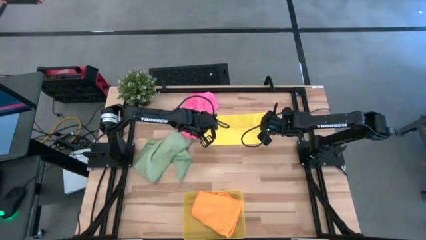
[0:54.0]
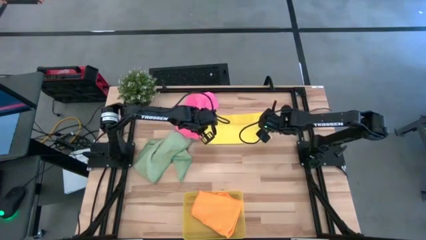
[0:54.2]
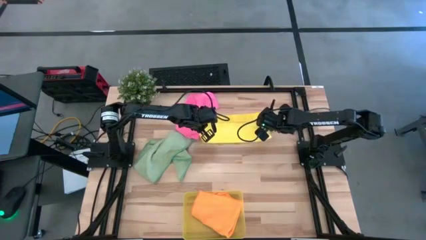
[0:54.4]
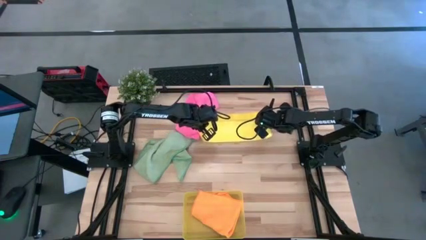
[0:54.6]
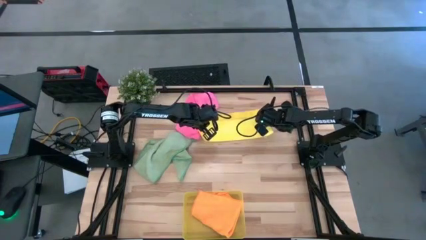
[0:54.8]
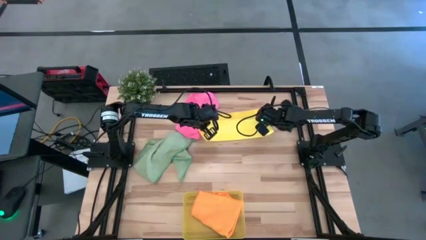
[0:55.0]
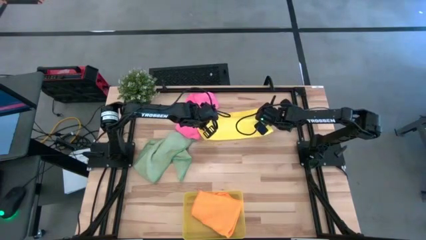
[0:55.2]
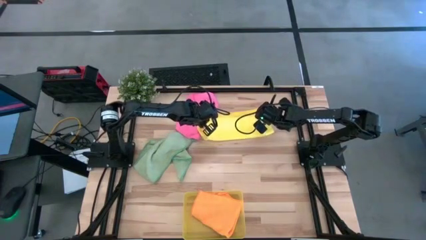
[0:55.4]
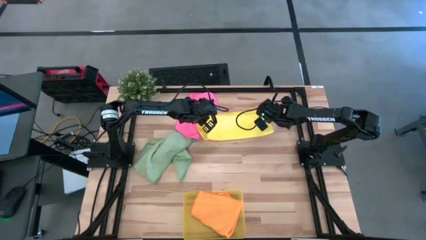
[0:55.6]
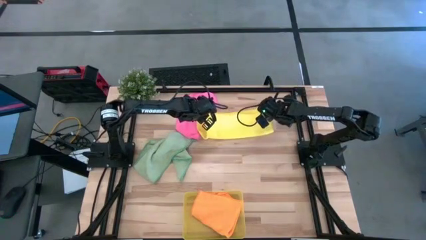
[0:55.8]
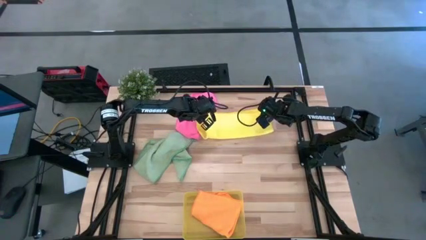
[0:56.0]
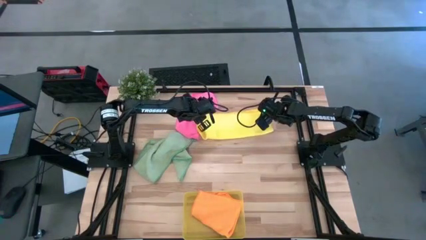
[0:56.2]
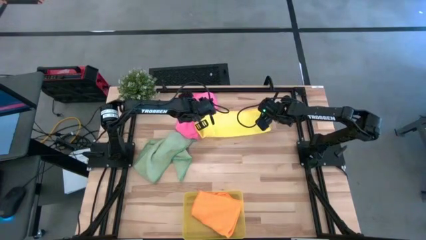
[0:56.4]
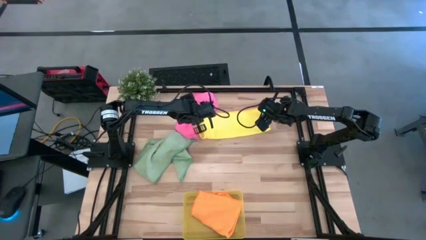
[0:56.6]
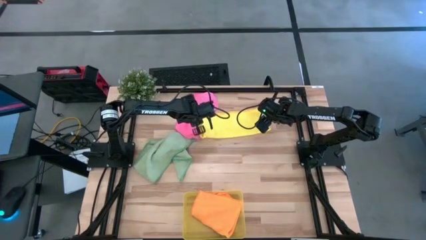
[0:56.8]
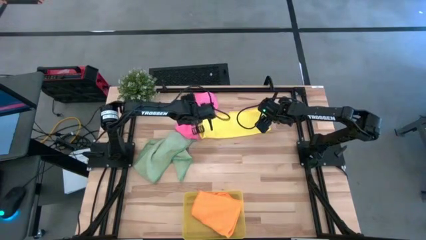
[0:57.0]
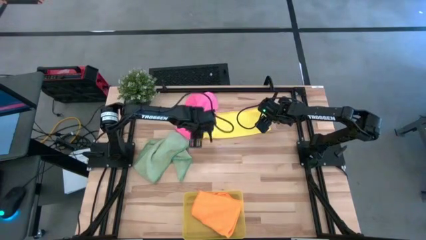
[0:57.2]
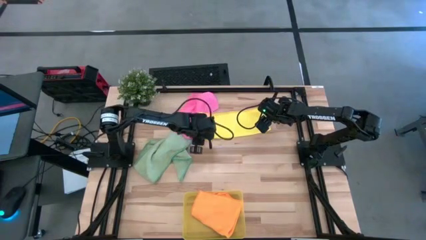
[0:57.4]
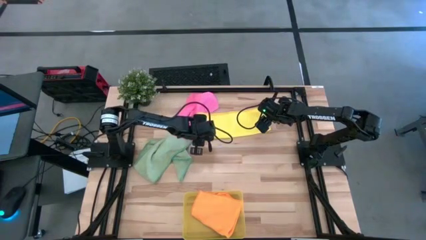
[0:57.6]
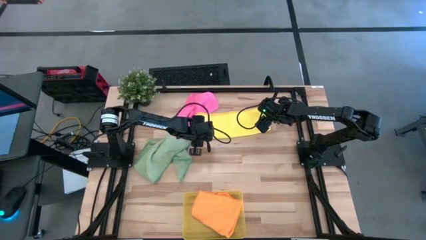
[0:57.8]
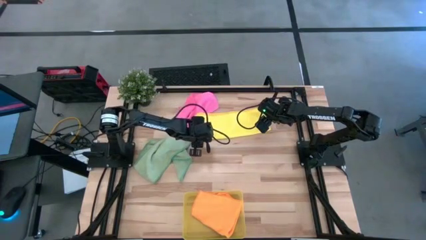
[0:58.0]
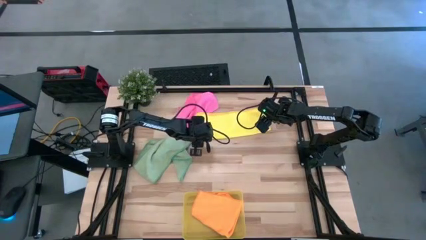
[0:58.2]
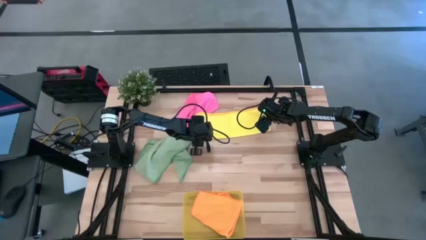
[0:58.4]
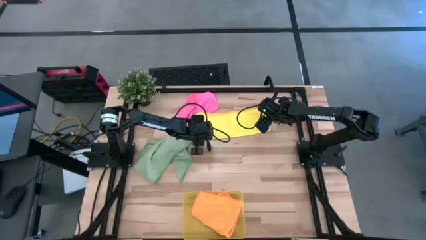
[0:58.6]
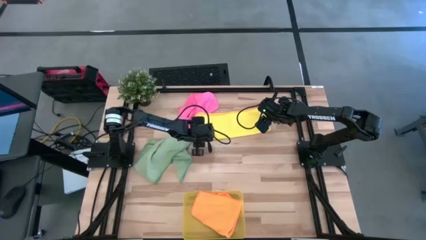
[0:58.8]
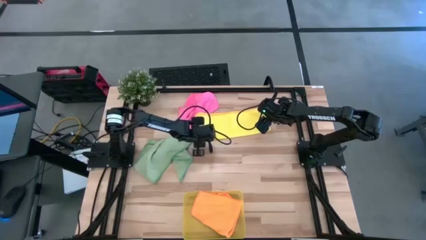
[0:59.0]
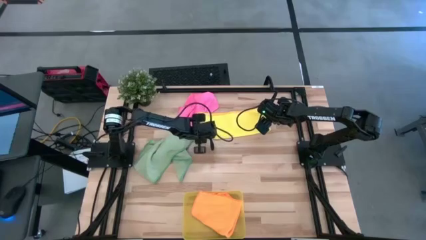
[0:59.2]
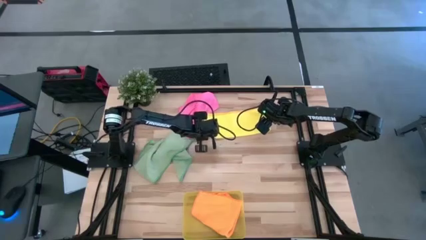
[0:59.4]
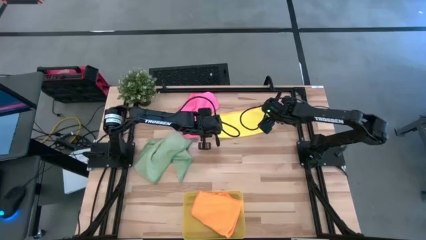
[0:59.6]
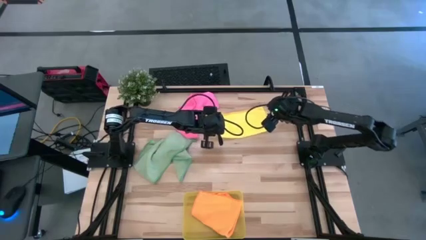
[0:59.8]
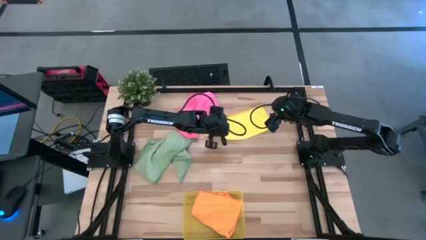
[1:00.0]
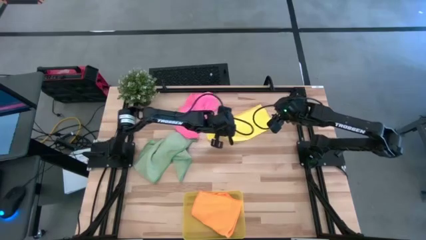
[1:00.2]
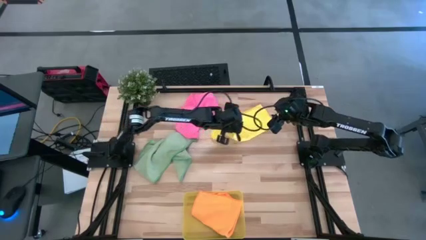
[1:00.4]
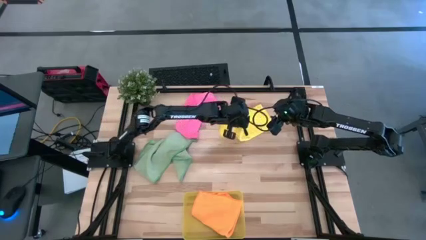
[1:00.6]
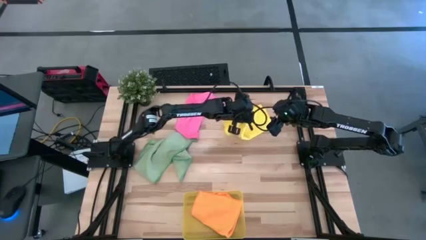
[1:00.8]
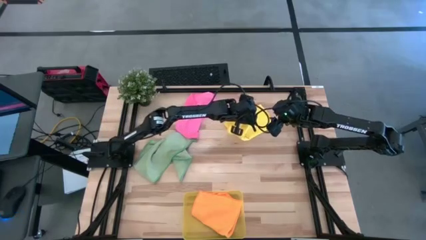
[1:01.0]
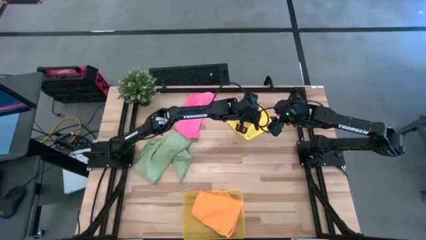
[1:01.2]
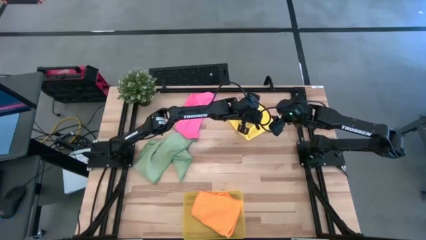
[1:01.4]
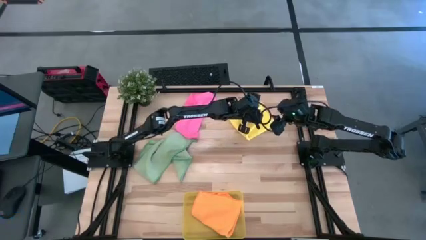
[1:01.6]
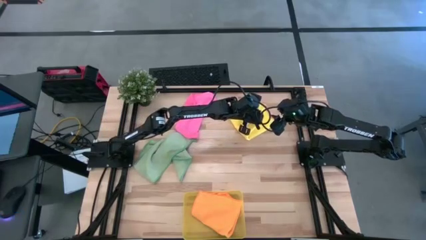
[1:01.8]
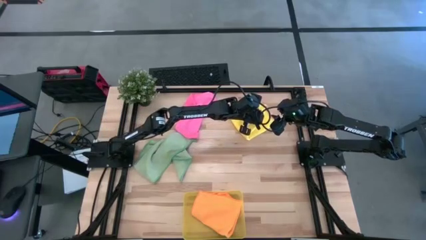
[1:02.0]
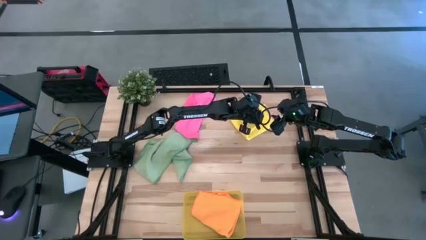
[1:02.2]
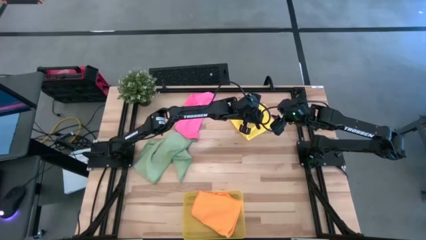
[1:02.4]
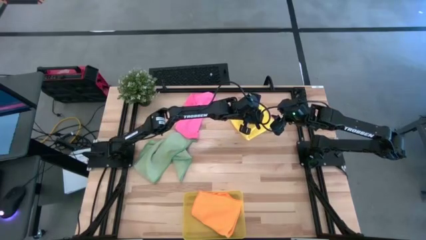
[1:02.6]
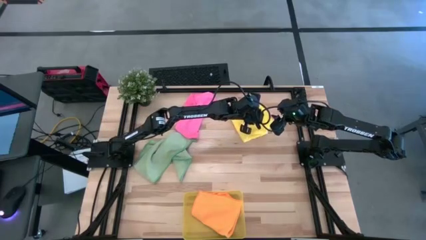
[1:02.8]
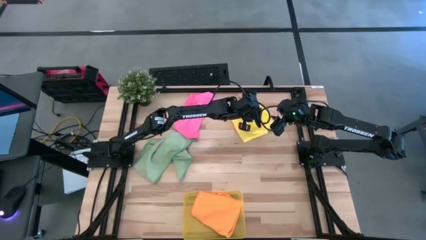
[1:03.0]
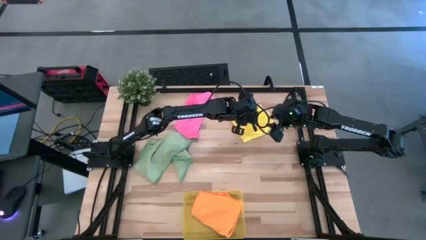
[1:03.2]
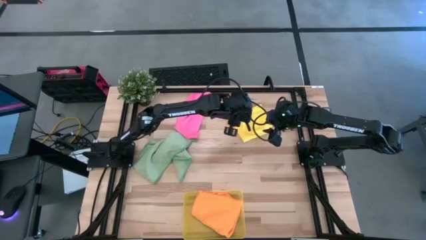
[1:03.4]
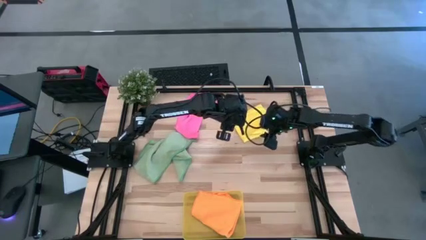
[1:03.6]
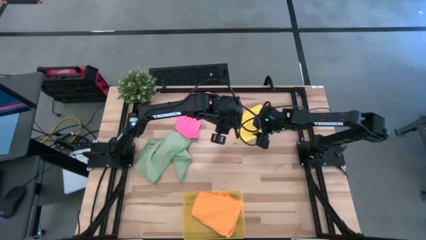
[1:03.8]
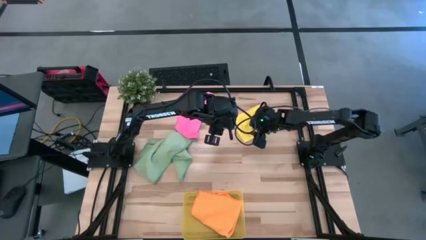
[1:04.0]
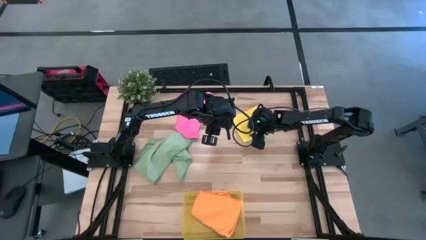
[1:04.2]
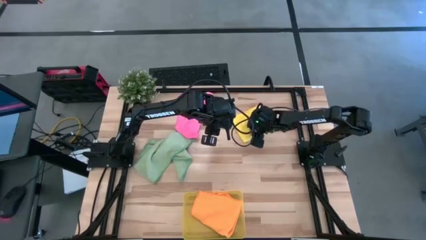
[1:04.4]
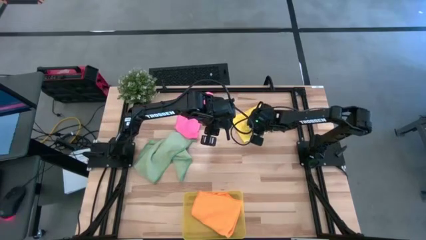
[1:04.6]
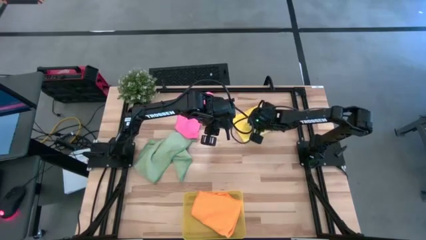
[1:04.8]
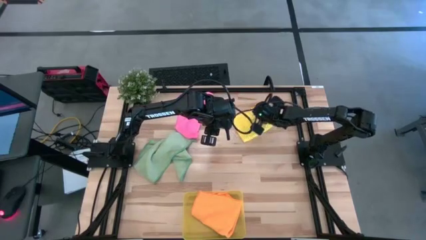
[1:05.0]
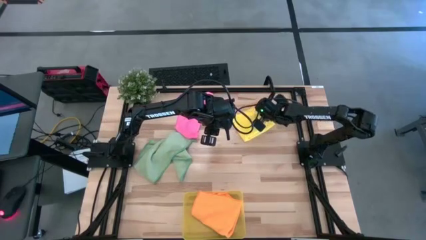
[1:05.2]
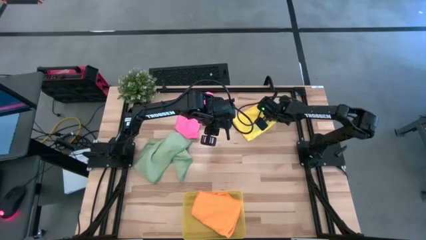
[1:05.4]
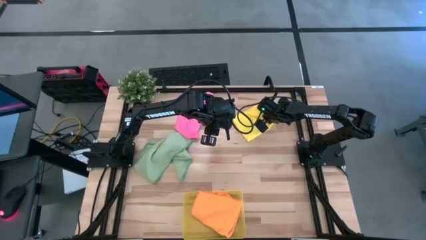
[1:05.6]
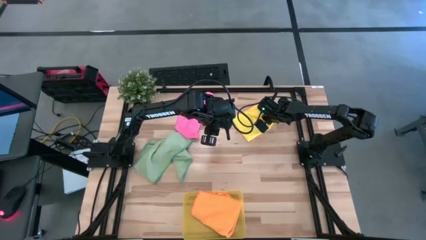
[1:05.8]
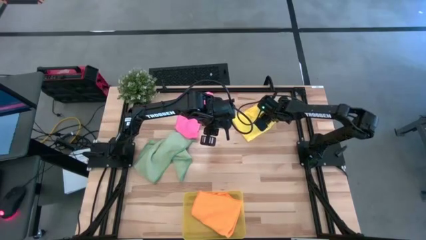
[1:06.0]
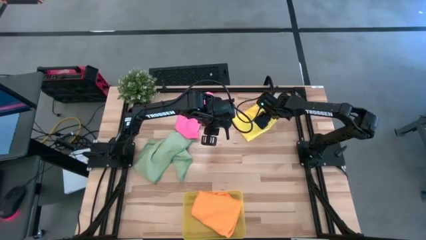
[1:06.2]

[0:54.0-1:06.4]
Task: Fold microfiber towels
Fold the yellow microfiber cloth

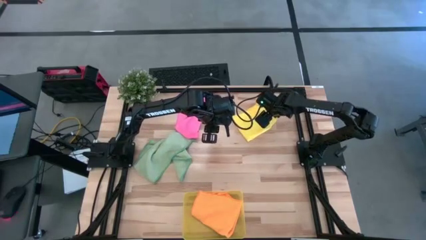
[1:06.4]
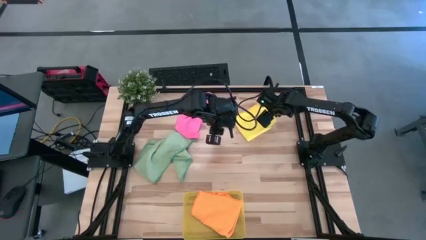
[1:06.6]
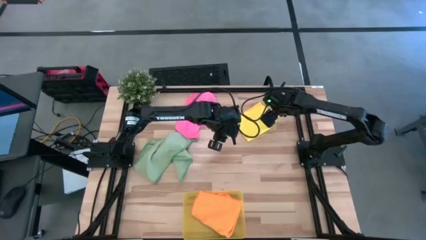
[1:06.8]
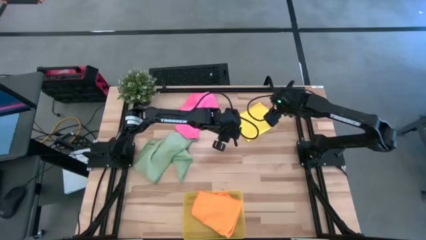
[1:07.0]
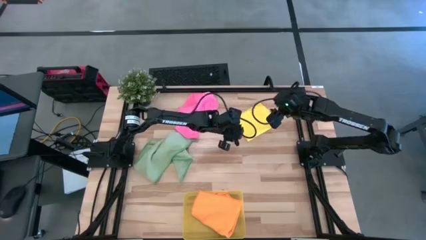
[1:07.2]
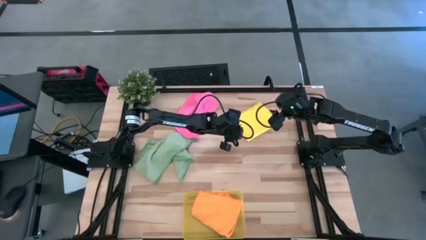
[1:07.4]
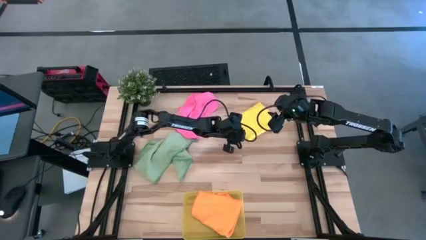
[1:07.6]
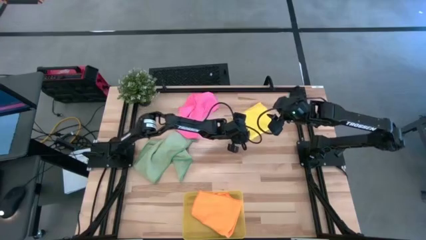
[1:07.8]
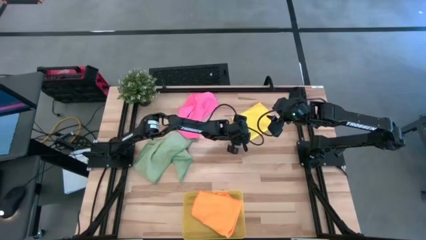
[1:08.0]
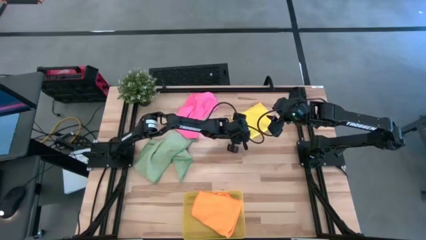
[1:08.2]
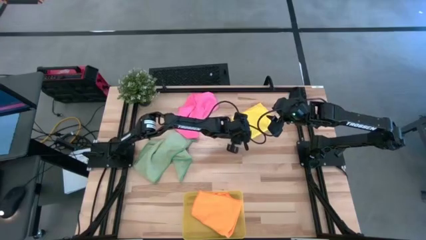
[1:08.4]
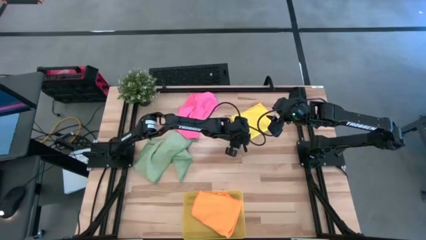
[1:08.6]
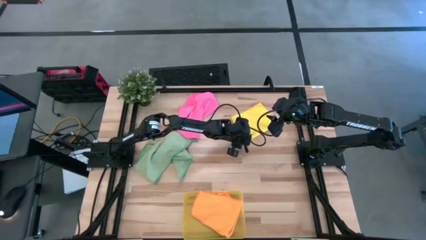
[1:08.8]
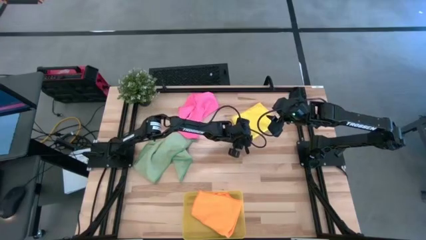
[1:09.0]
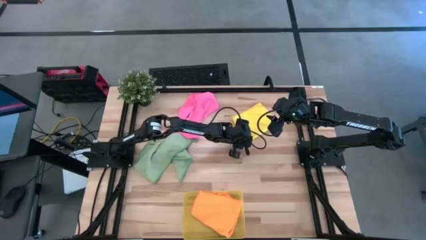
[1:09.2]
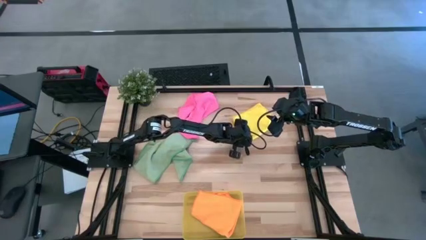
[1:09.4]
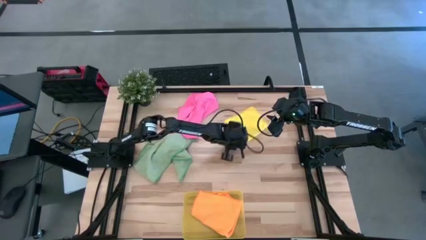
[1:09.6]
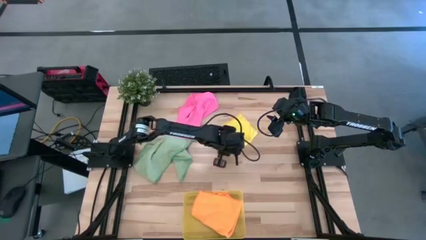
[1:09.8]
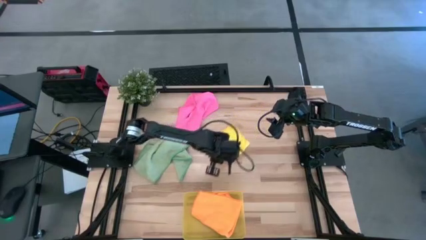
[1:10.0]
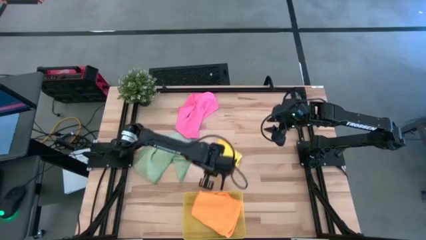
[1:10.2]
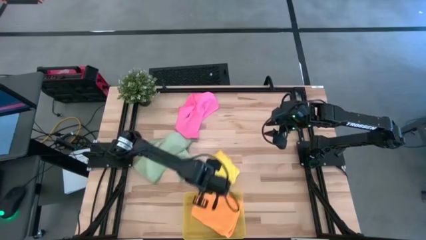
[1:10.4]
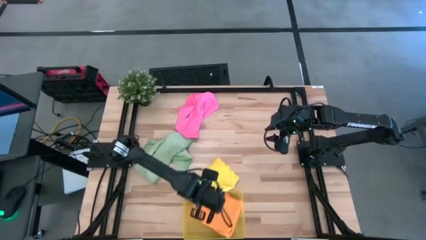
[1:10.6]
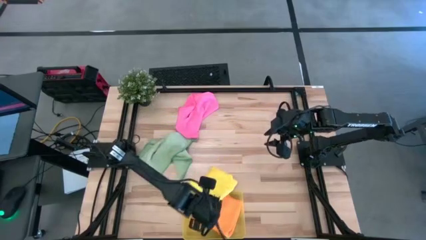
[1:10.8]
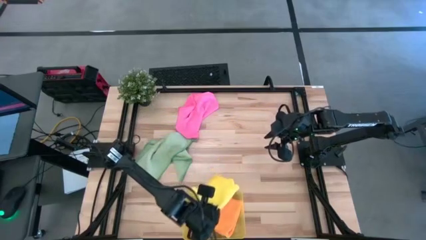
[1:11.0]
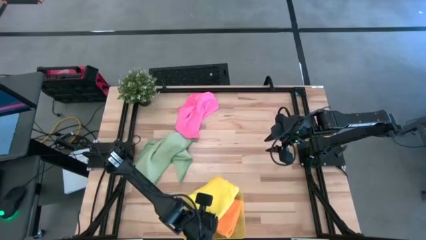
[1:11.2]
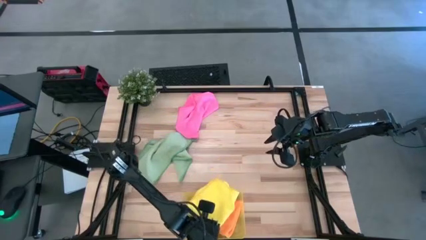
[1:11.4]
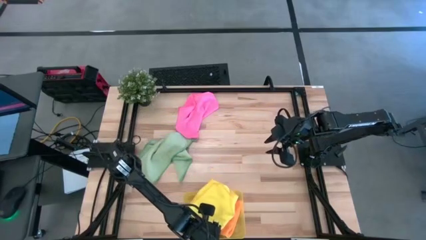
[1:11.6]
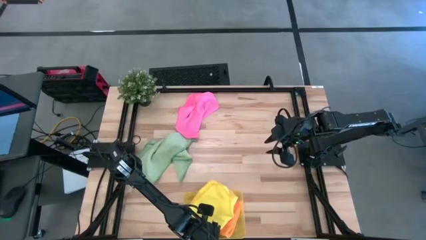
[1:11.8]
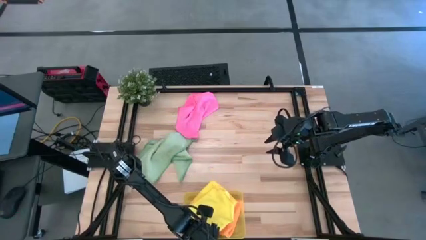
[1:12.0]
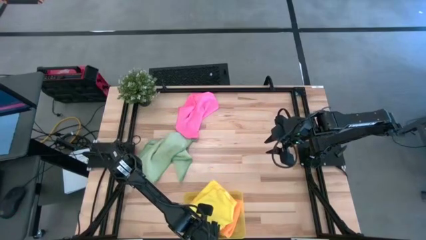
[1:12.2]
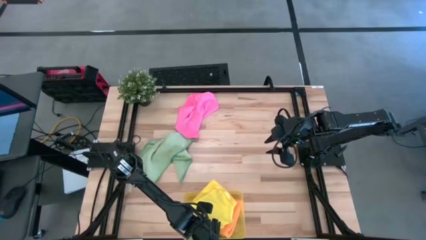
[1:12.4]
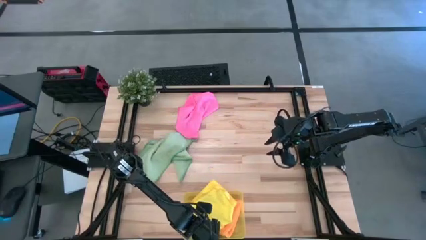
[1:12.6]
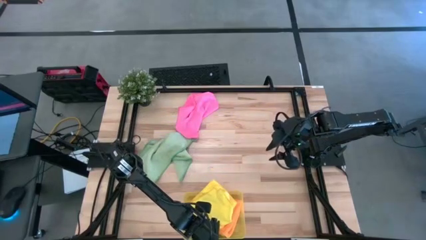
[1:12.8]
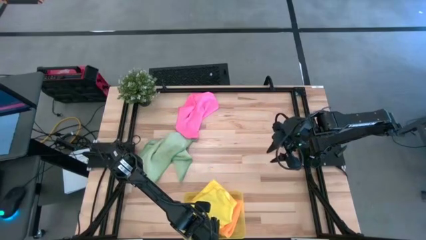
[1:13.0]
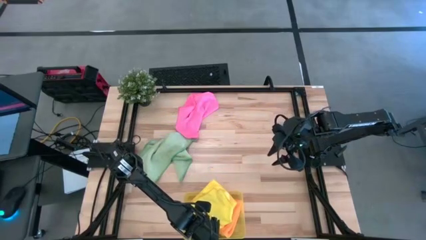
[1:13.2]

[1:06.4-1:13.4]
Put the yellow microfiber cloth into the yellow bin
